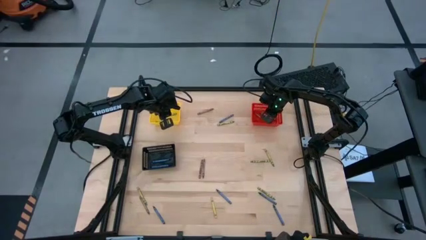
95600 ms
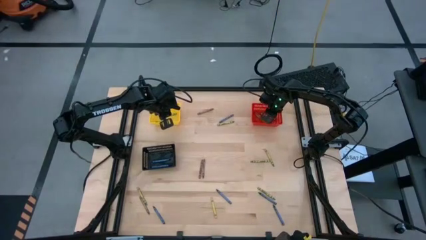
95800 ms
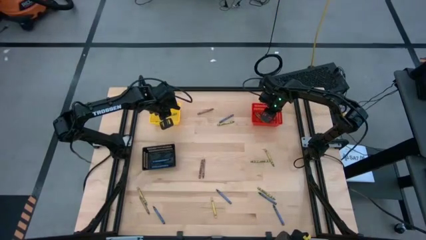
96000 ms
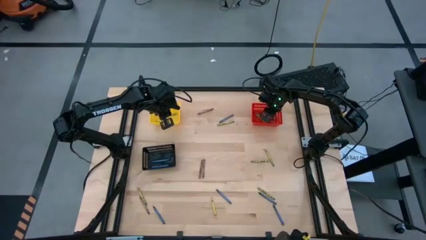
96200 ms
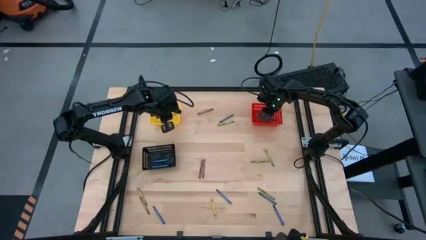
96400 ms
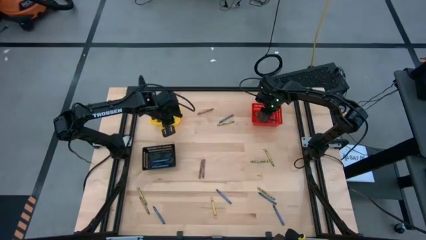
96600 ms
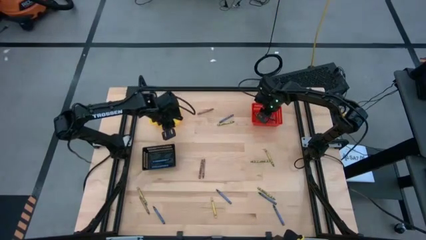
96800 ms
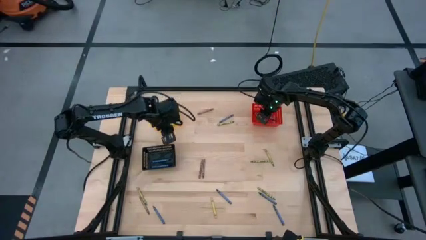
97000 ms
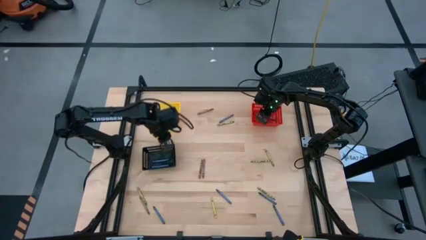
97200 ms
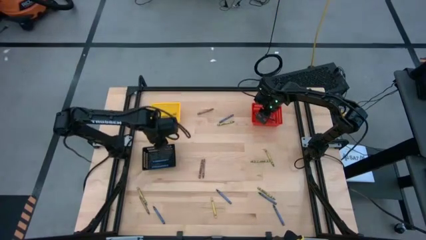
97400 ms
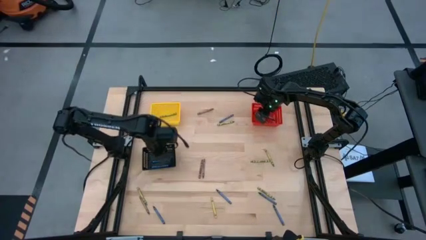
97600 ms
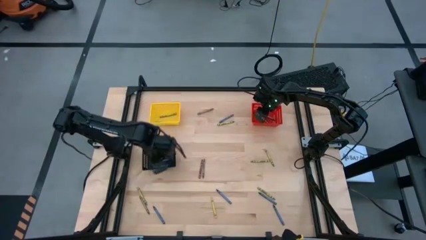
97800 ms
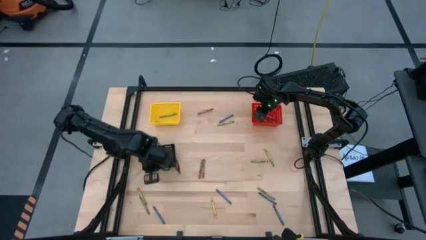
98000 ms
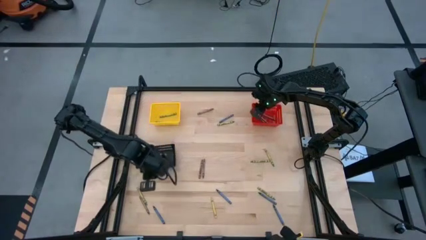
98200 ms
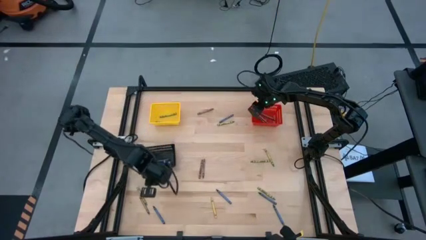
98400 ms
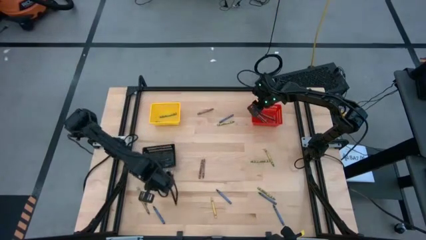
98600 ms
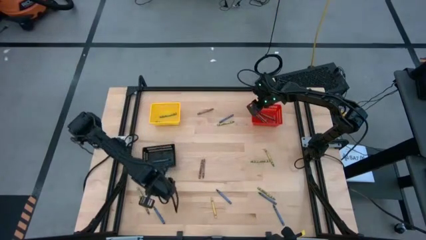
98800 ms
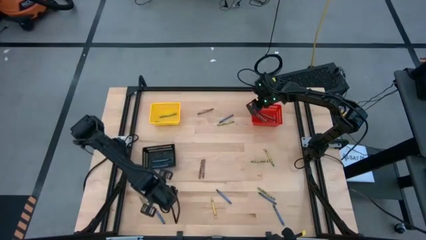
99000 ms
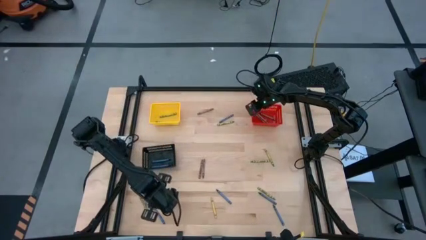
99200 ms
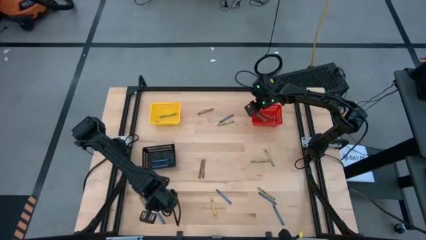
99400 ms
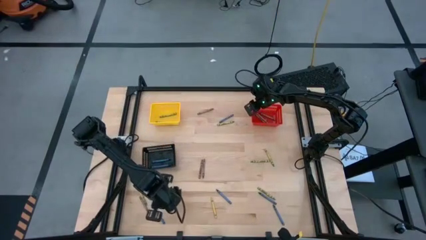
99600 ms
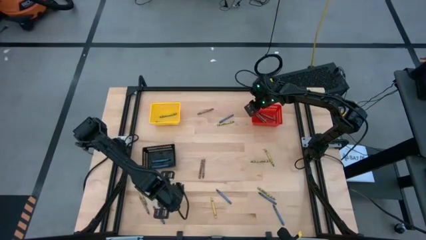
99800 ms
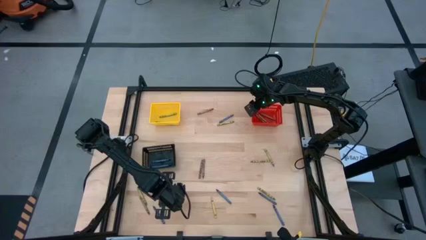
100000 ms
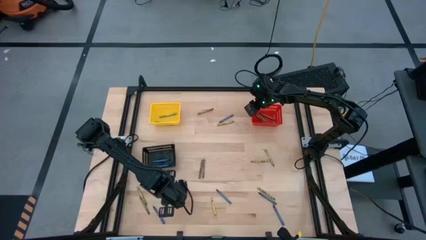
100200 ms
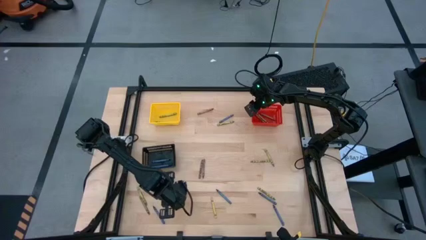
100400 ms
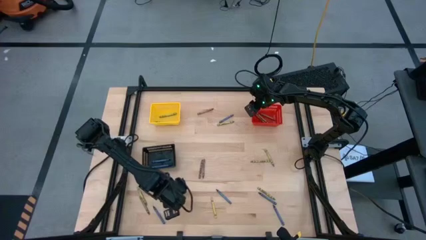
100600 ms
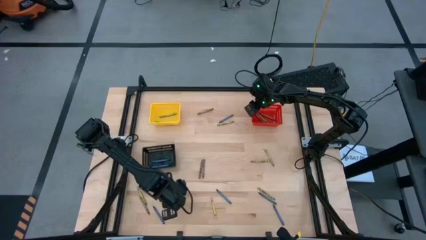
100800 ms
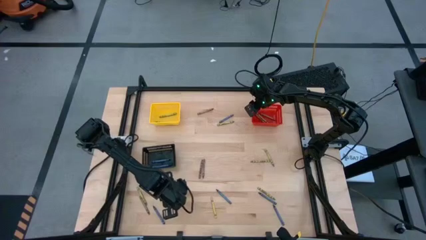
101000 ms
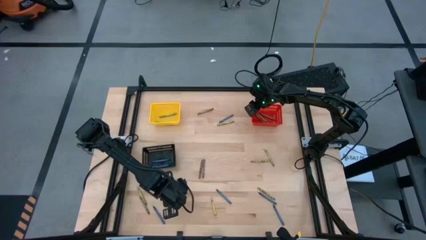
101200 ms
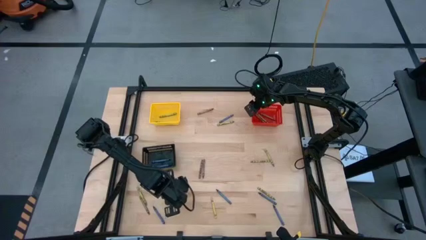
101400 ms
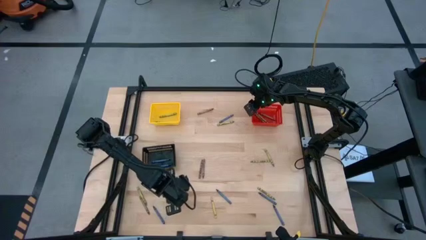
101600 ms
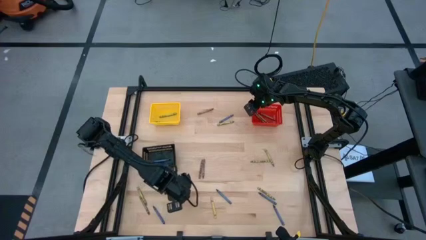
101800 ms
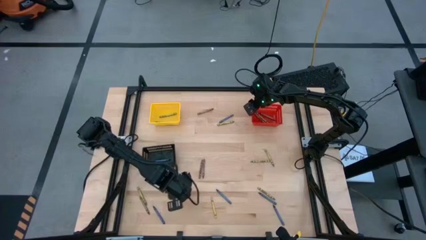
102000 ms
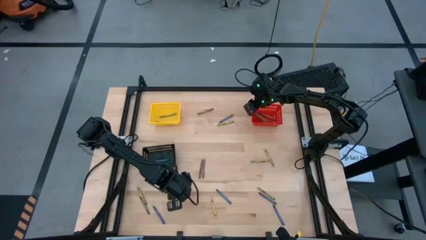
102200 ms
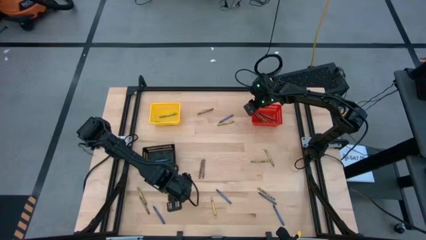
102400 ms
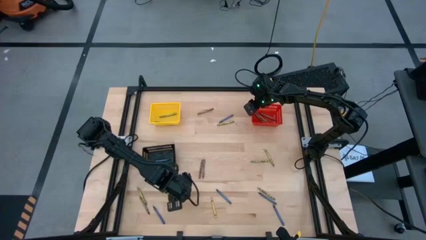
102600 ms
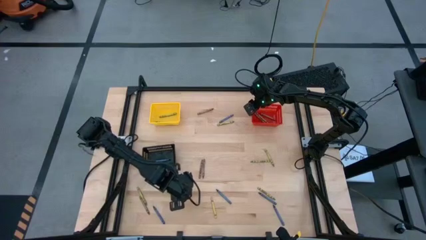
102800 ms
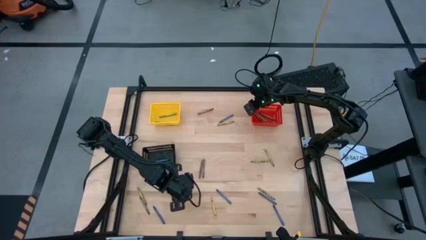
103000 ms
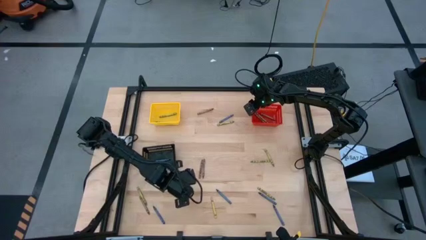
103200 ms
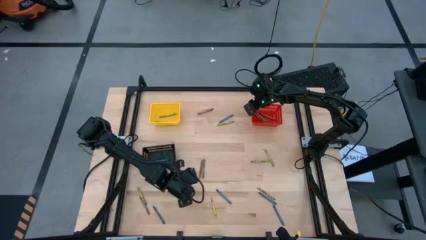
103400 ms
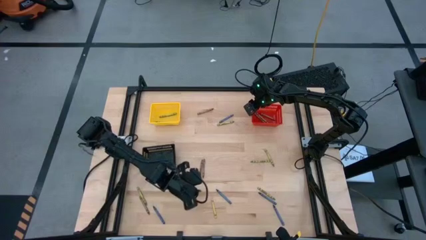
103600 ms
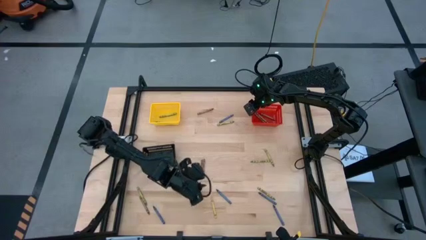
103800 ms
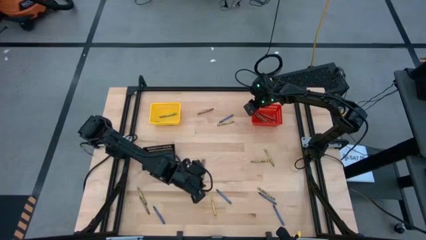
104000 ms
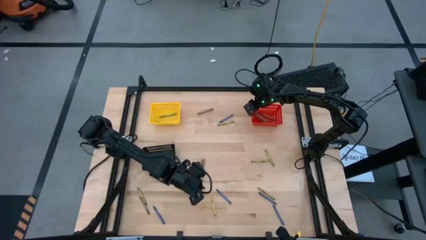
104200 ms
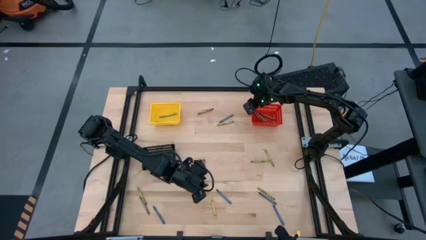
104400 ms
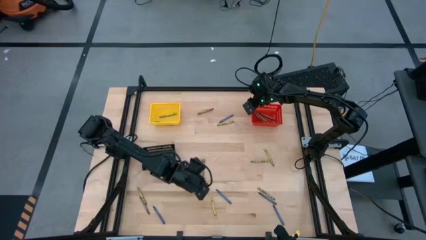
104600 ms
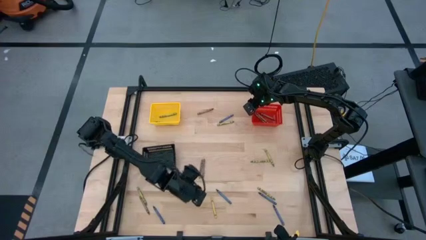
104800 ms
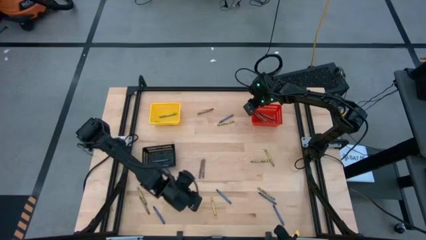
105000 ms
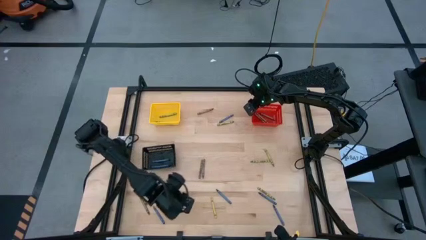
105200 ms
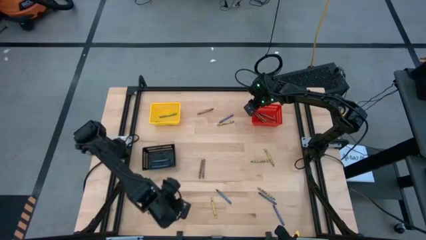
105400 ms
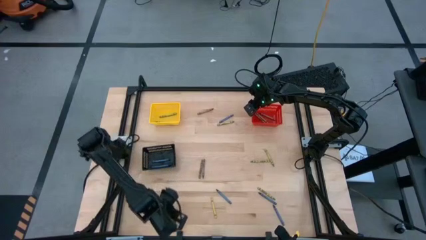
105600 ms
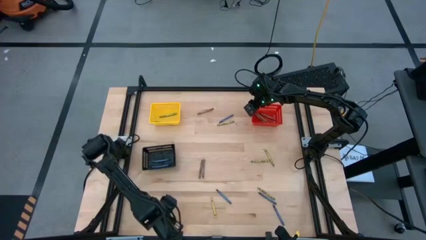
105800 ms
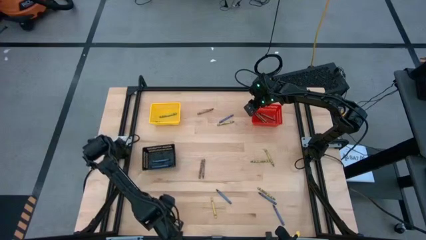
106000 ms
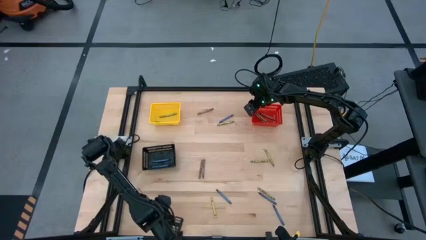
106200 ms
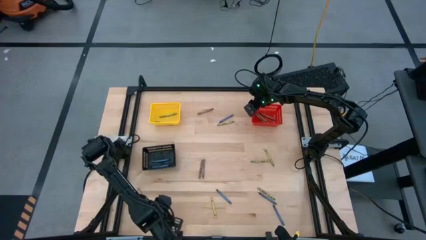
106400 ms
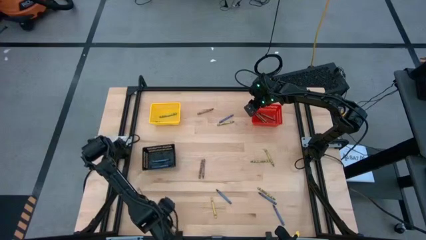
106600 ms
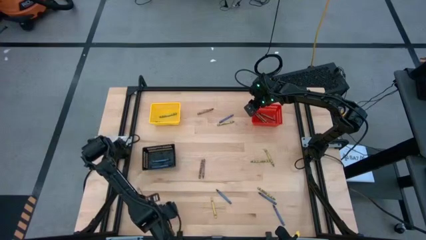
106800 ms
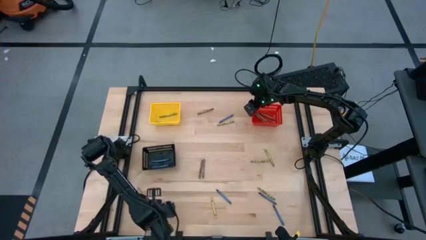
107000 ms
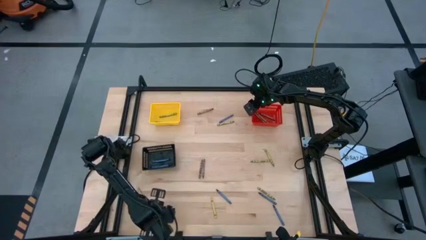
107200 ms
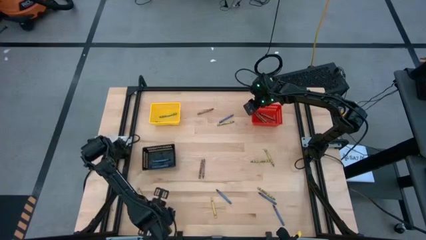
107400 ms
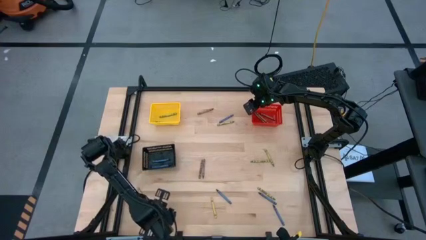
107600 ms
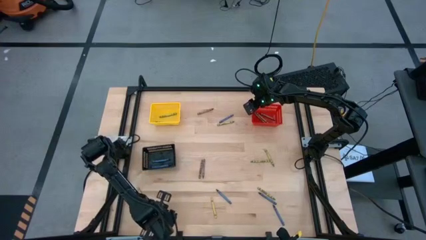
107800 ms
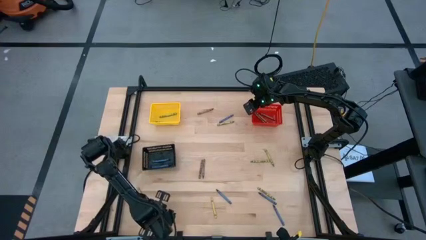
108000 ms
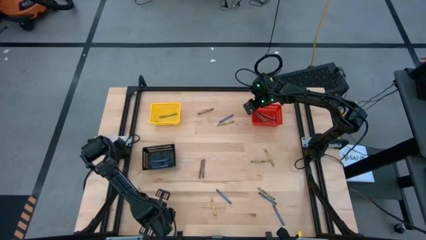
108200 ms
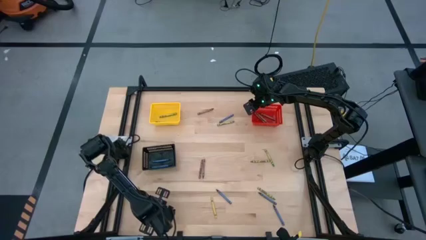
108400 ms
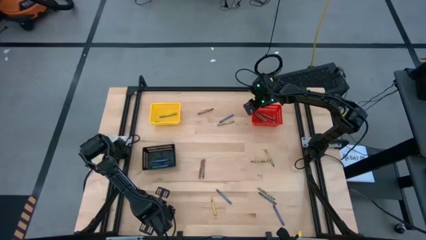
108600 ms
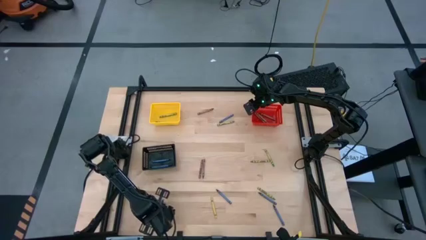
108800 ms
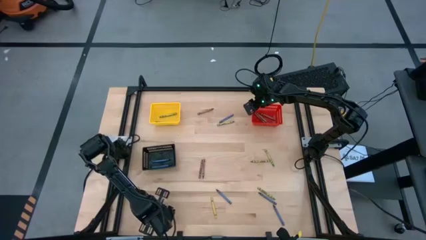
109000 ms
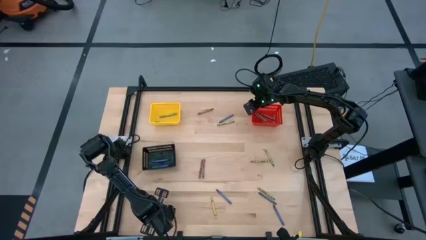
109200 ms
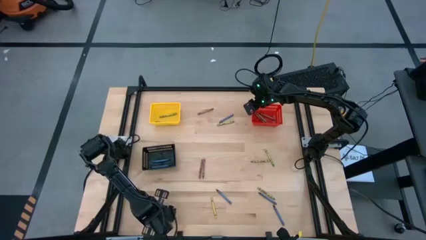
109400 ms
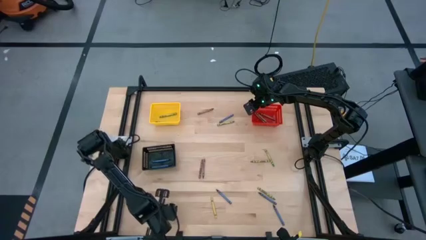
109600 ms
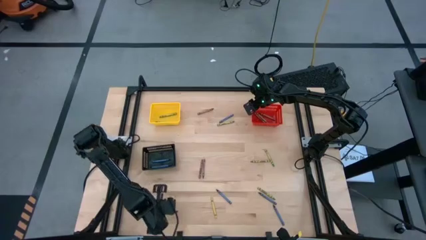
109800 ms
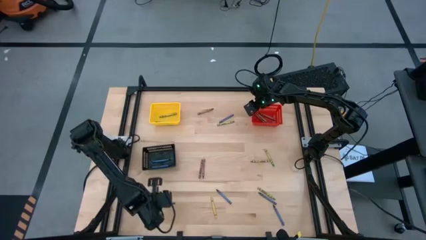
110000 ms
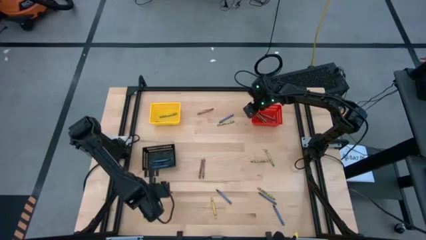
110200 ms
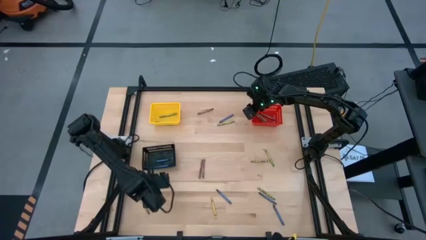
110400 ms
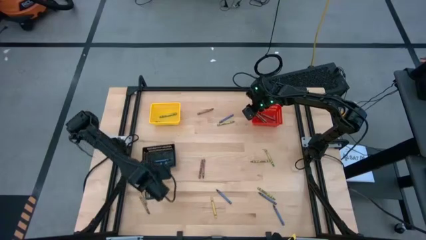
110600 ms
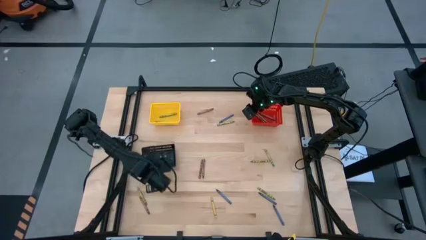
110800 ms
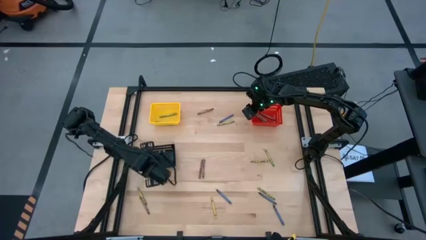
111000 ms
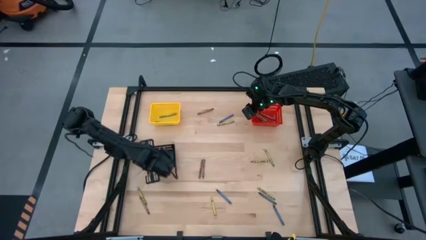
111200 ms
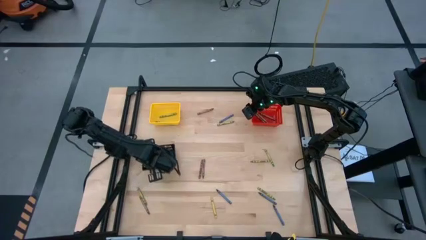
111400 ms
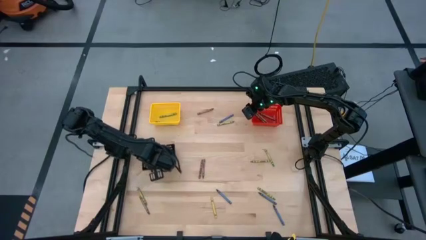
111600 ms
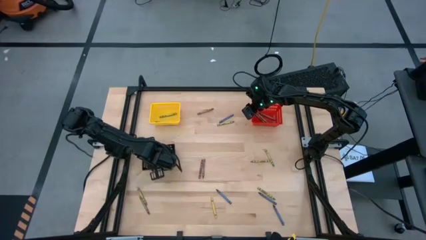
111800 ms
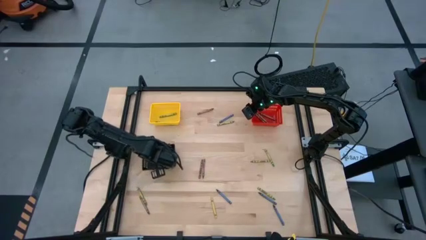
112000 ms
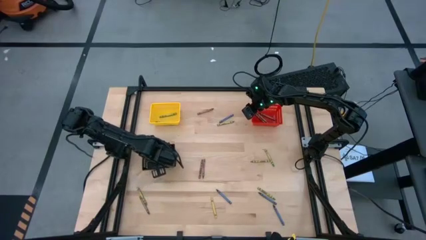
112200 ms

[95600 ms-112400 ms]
Task: Sort crayons
Put the blue crayon into the black bin
